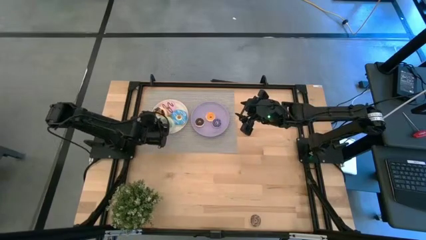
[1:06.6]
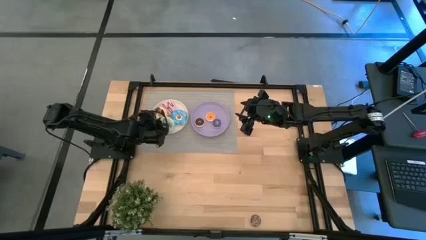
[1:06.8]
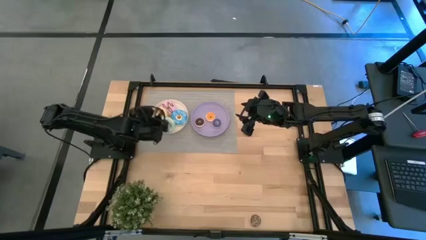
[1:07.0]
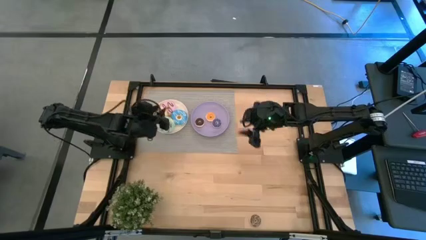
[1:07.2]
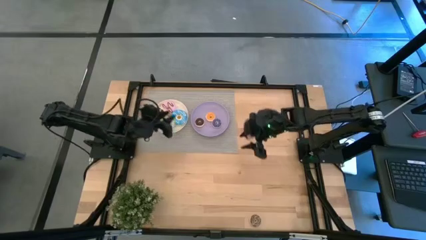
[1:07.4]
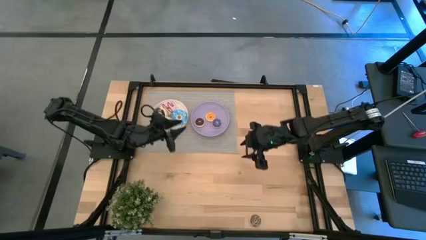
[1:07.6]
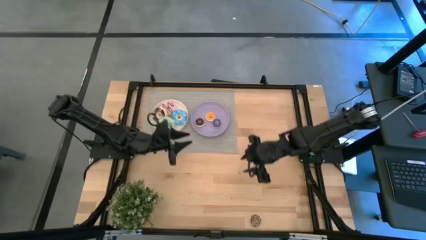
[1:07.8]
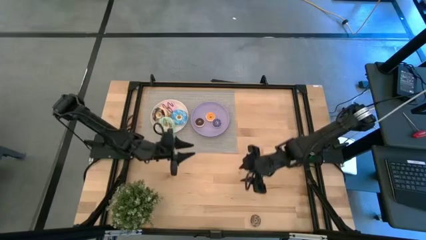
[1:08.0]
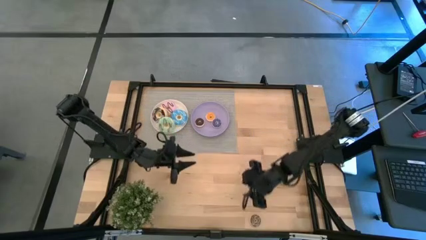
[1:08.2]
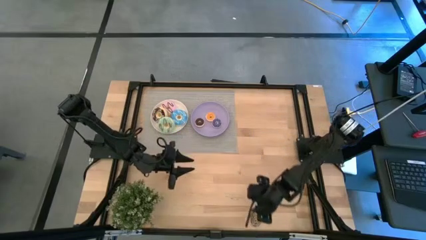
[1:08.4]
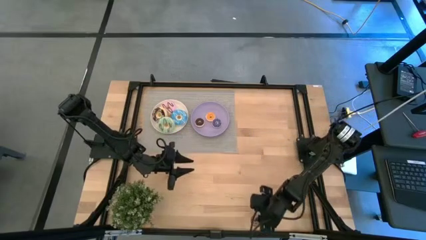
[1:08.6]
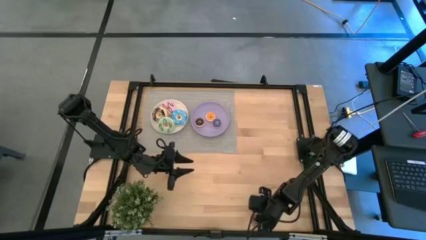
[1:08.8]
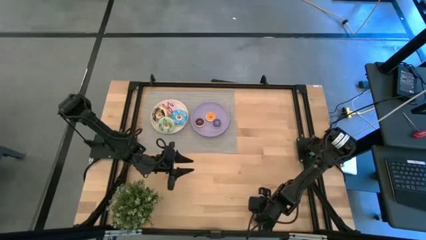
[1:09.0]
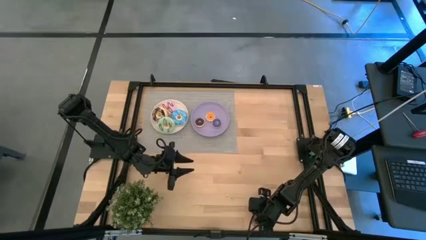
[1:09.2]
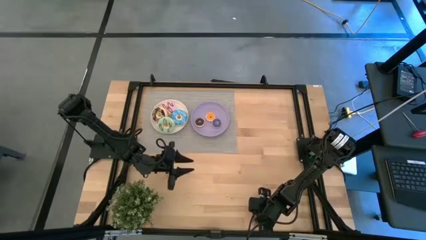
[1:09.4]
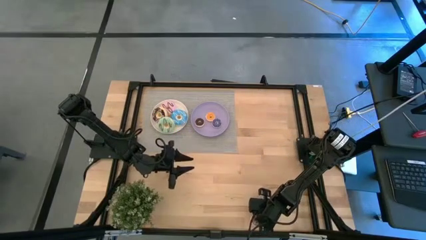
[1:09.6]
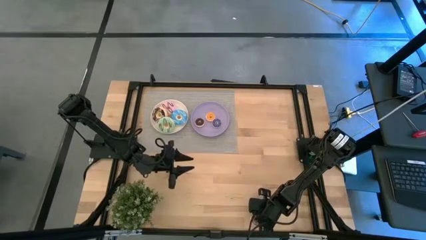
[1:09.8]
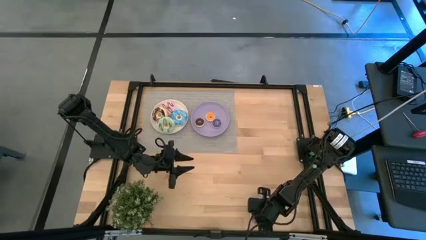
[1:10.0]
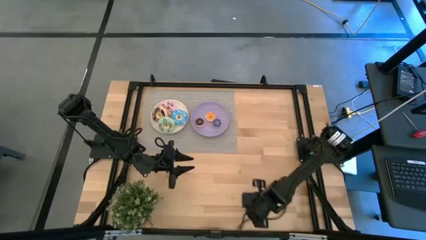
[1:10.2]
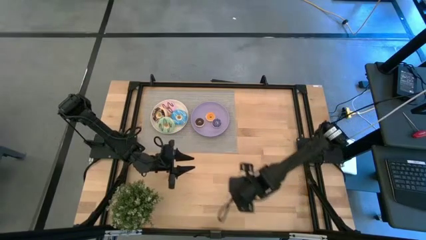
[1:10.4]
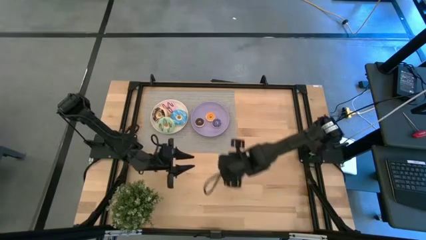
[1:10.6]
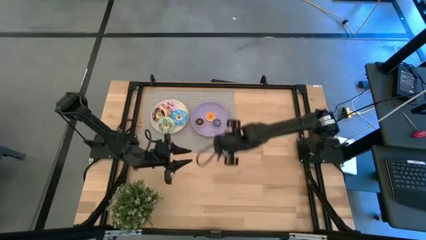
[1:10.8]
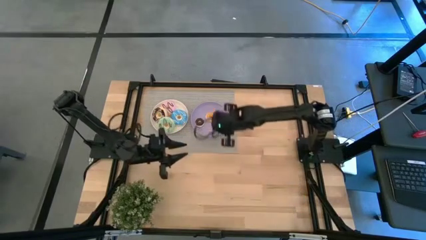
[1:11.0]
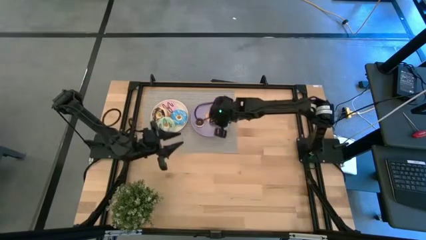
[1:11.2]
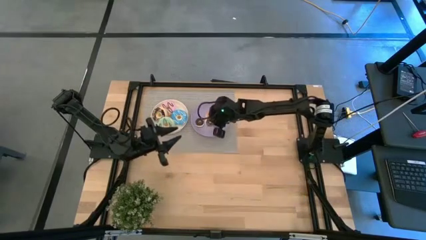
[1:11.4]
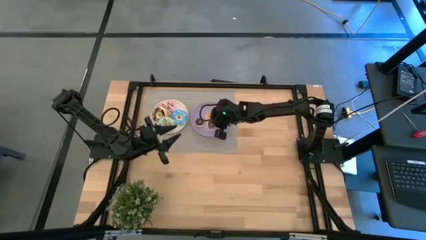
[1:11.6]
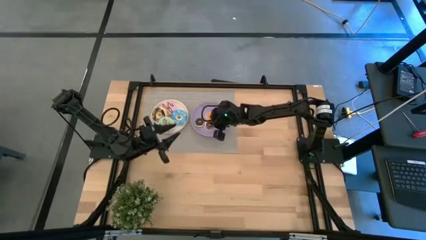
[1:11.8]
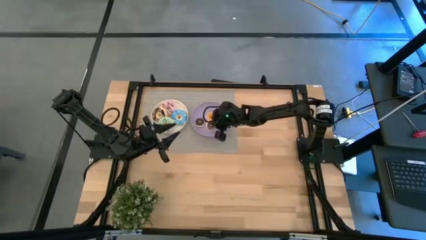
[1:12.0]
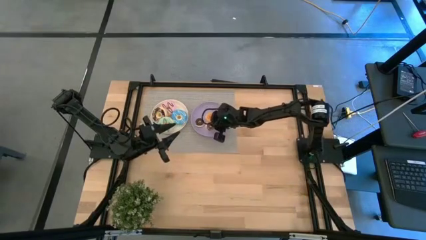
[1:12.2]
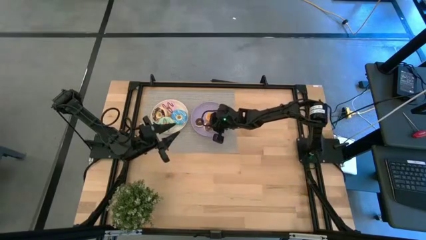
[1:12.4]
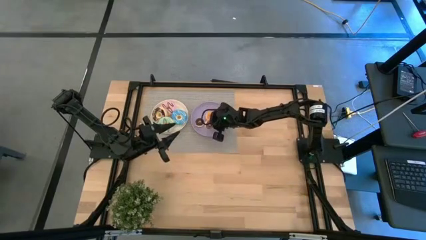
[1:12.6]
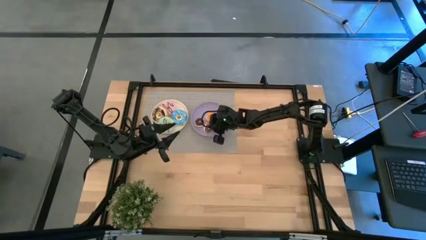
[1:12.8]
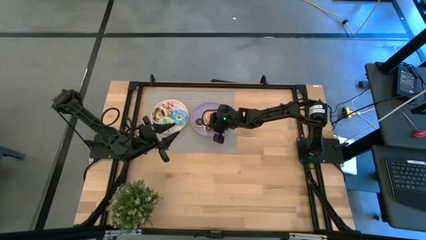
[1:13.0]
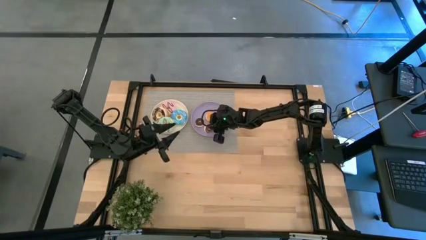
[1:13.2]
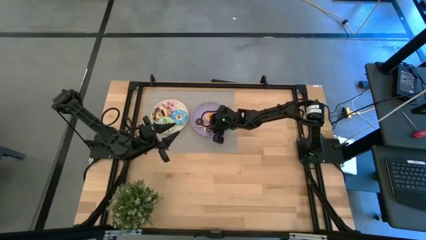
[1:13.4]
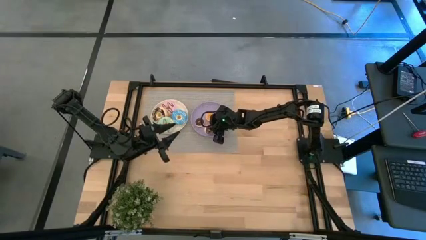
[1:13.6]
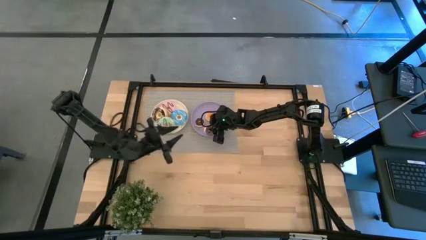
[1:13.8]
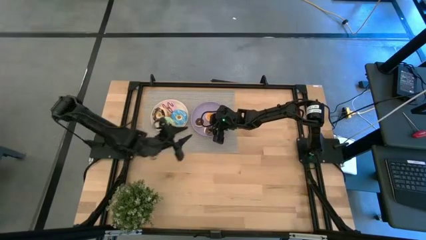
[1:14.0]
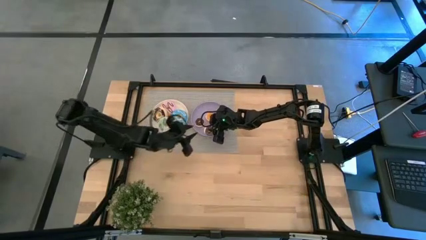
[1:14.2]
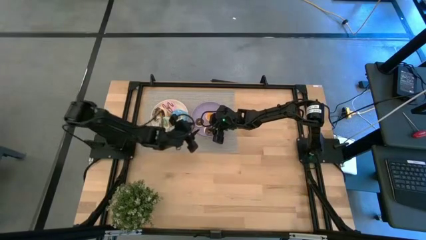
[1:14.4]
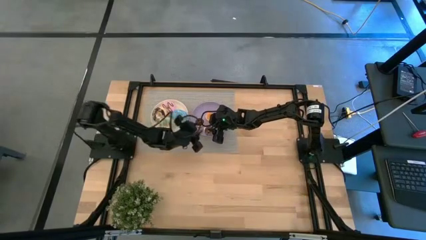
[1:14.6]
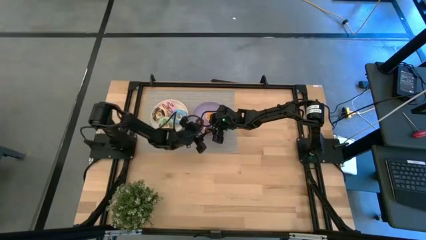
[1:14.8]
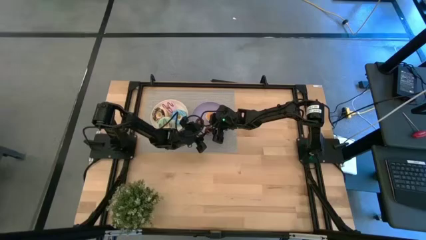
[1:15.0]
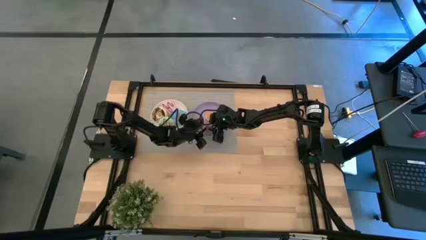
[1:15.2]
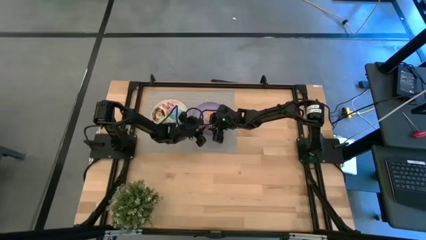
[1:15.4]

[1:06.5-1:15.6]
Task: Pick & Place donuts
Put the large brown donut on the purple plate

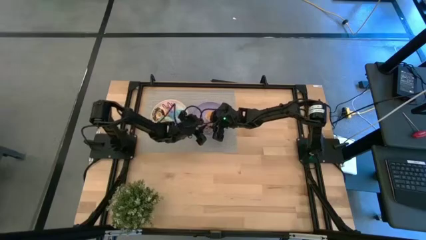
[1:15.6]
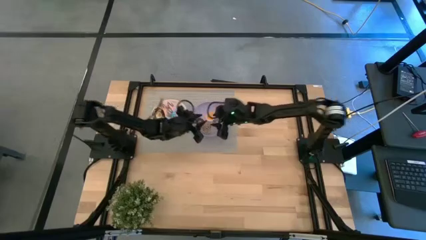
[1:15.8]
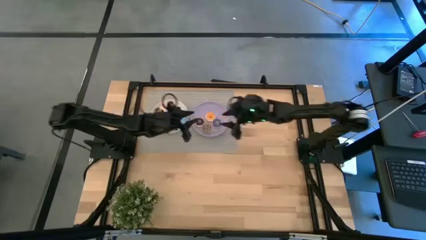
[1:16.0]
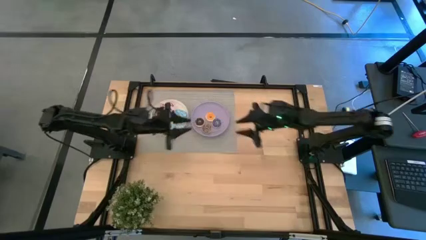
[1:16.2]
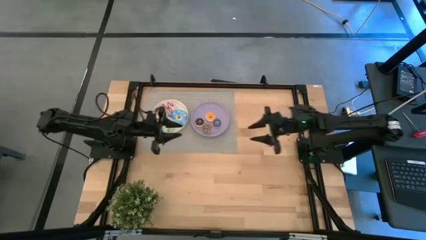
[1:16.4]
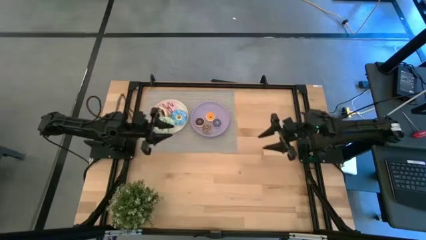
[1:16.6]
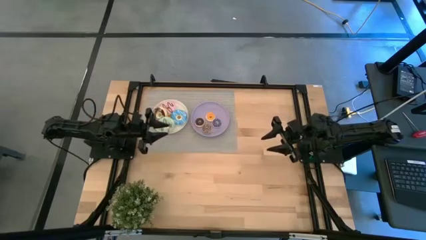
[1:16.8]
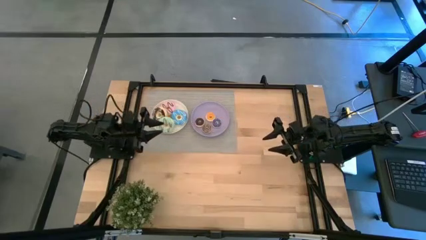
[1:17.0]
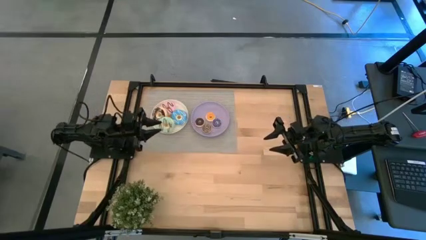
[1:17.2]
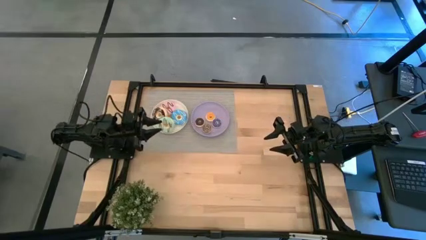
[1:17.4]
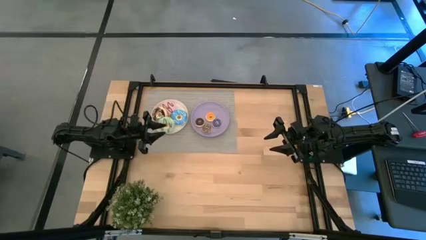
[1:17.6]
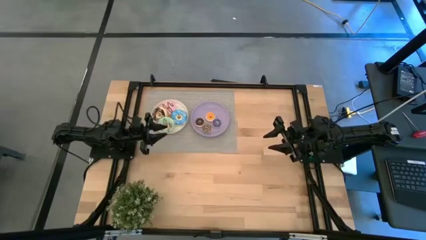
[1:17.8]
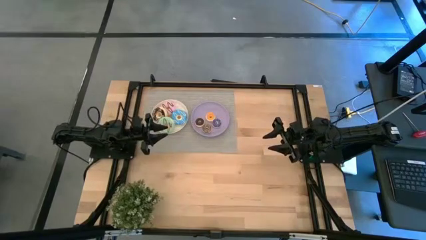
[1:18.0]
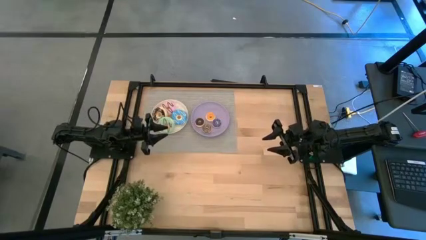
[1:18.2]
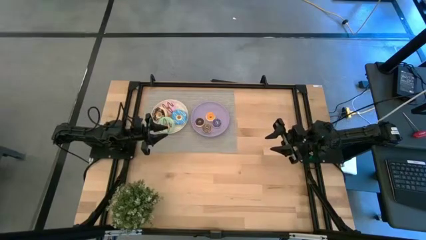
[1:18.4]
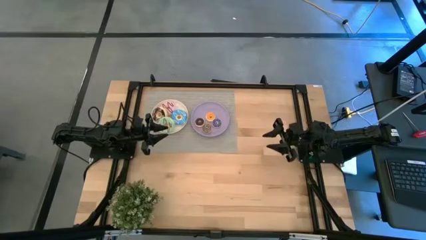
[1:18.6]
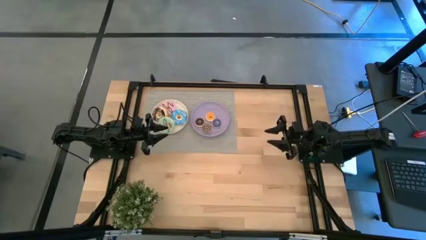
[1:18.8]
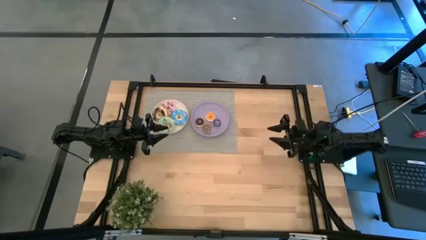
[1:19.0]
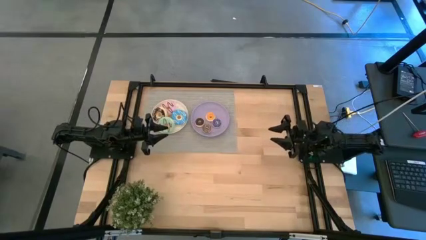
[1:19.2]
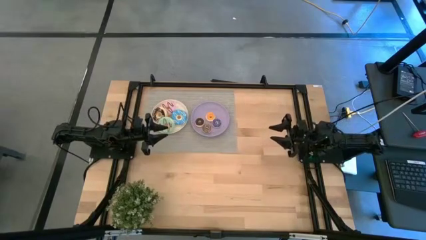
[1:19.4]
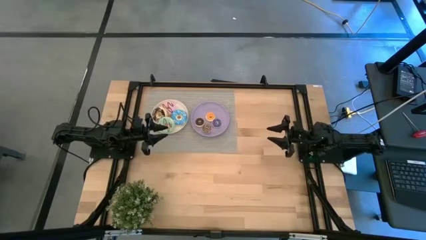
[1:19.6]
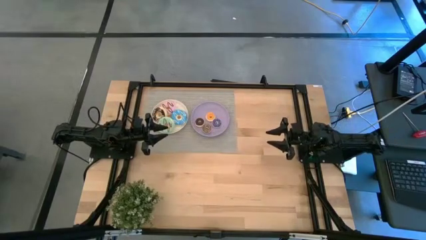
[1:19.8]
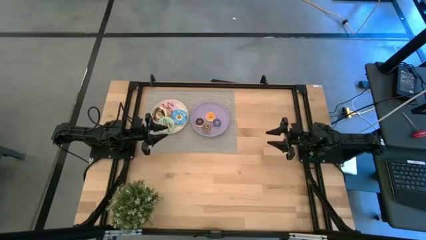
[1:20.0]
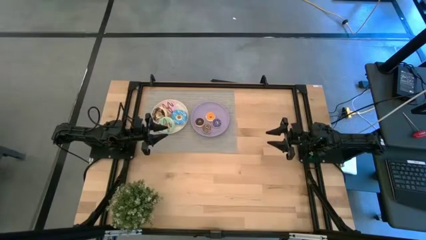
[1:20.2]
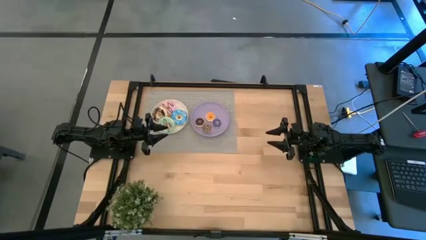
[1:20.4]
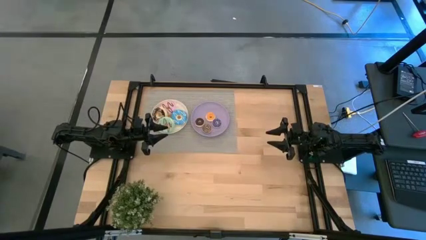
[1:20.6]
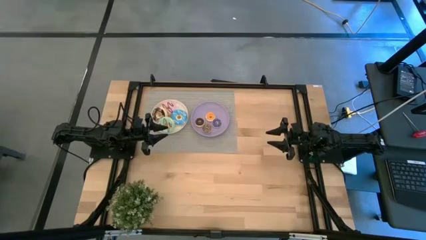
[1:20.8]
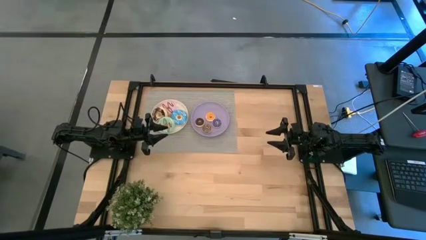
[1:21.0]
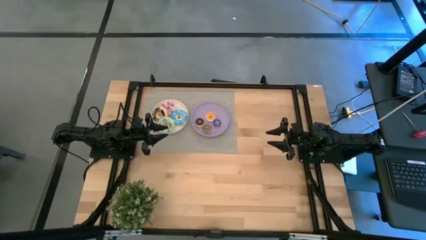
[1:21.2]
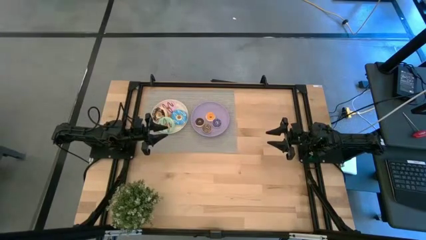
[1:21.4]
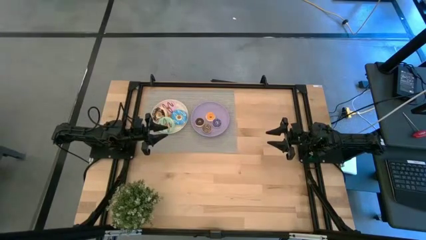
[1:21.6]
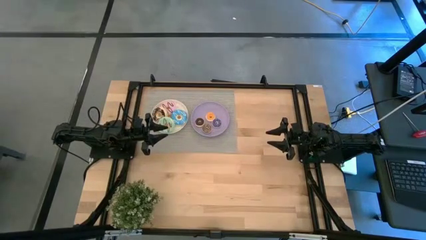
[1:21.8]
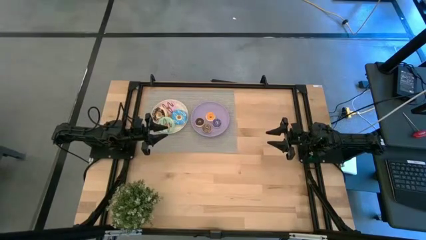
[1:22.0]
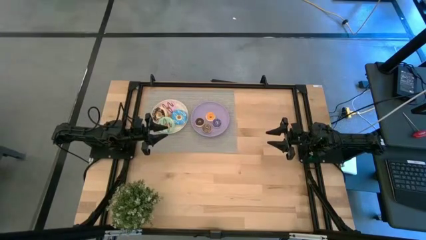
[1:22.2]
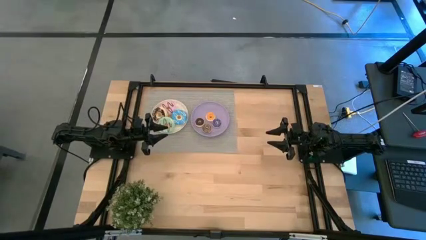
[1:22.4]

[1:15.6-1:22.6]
Return to Home Position
